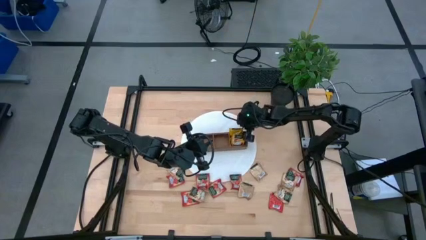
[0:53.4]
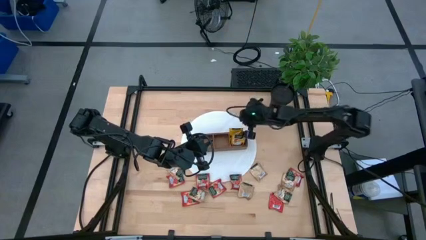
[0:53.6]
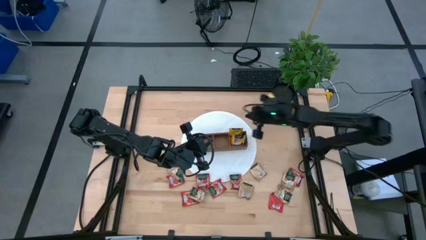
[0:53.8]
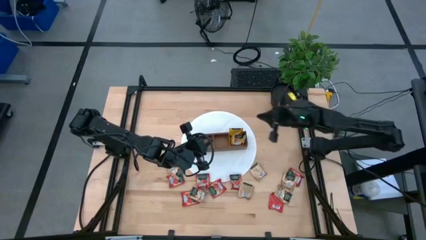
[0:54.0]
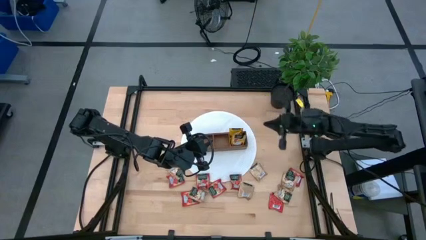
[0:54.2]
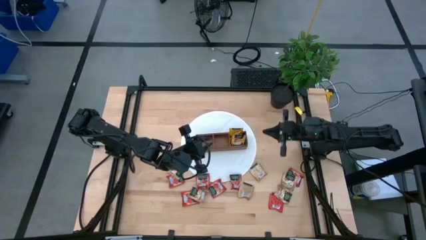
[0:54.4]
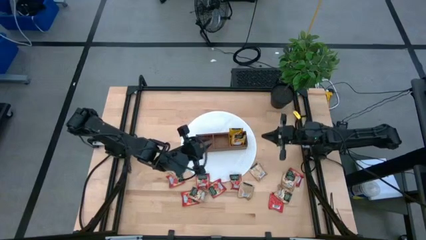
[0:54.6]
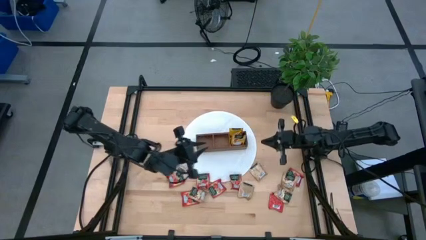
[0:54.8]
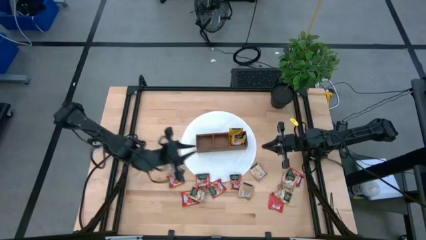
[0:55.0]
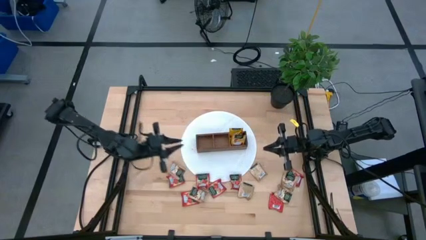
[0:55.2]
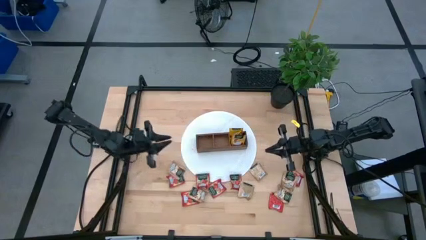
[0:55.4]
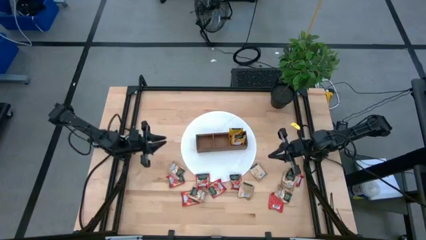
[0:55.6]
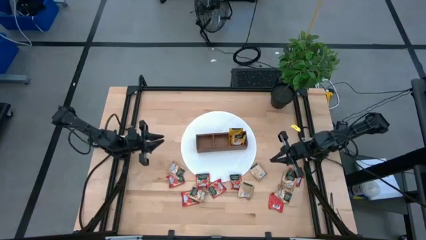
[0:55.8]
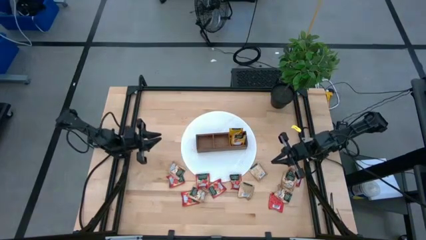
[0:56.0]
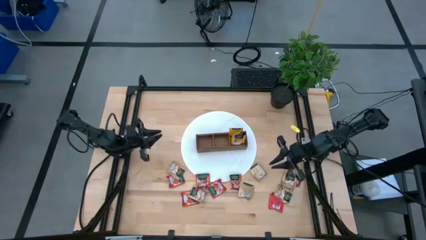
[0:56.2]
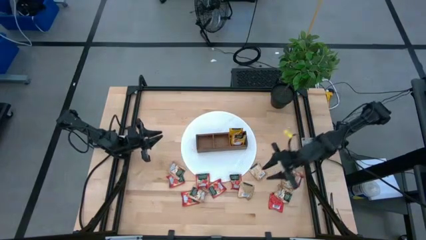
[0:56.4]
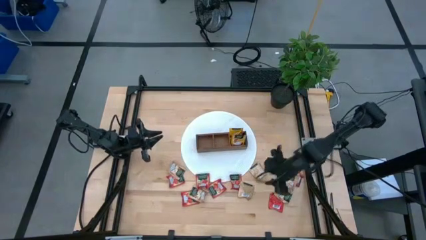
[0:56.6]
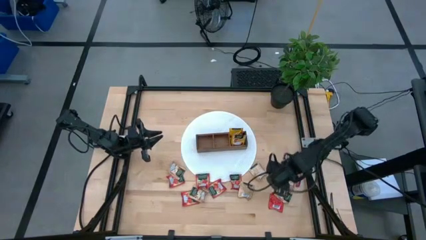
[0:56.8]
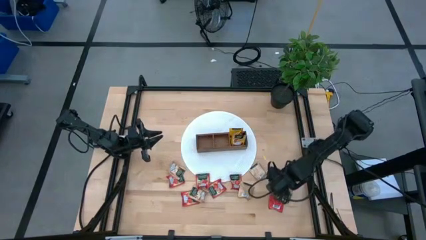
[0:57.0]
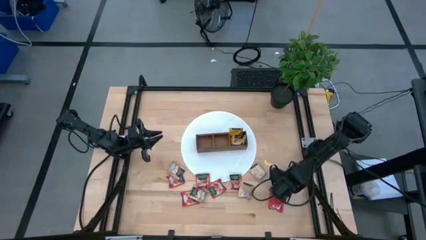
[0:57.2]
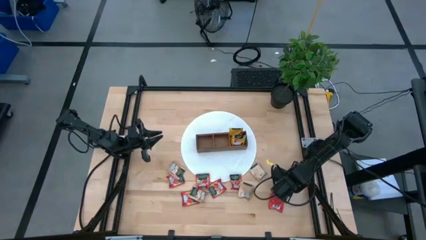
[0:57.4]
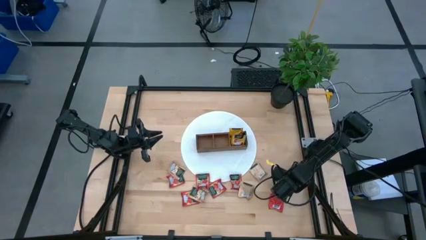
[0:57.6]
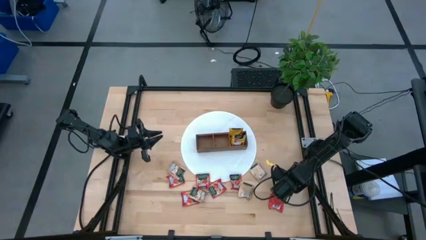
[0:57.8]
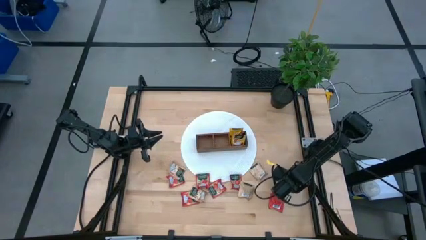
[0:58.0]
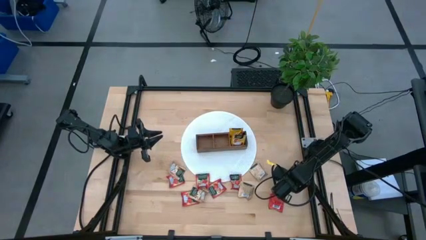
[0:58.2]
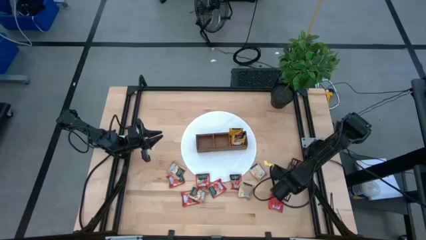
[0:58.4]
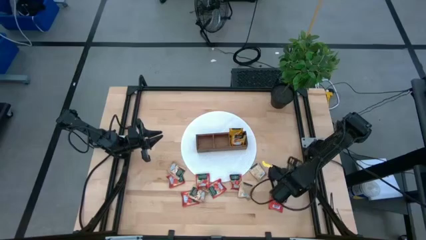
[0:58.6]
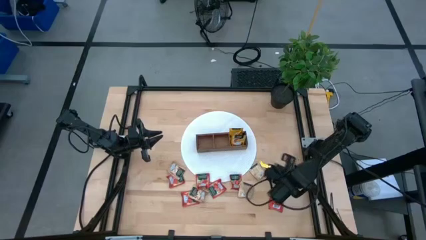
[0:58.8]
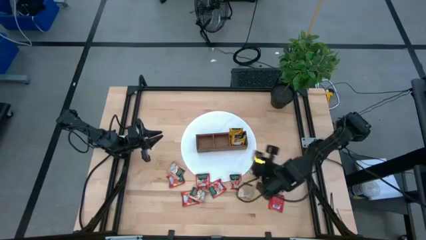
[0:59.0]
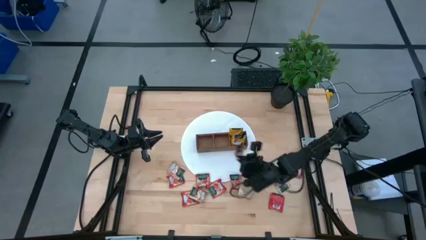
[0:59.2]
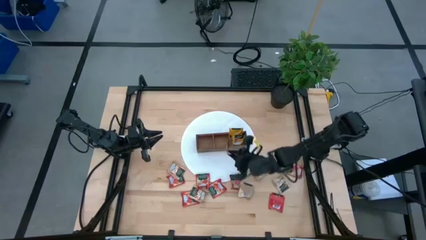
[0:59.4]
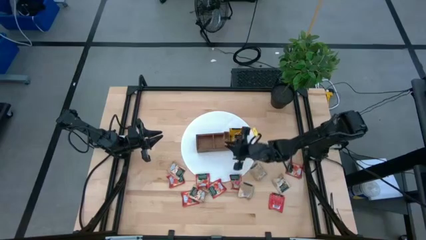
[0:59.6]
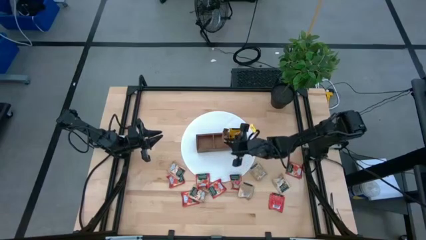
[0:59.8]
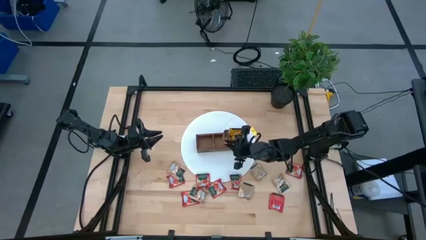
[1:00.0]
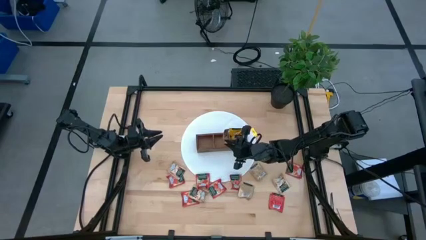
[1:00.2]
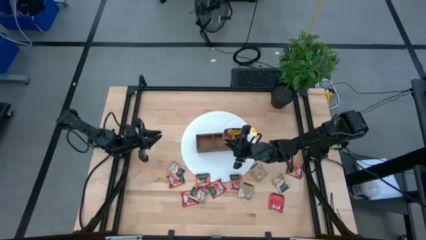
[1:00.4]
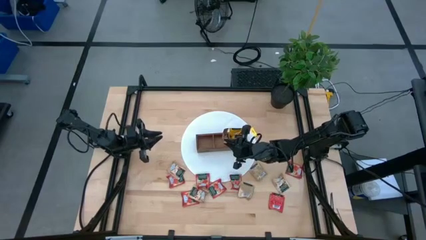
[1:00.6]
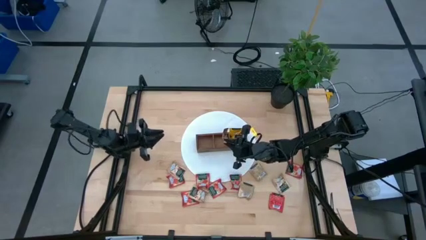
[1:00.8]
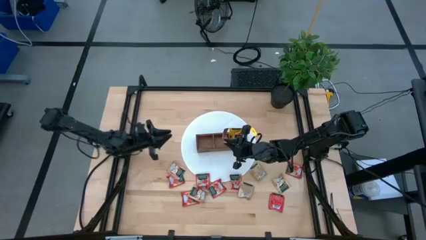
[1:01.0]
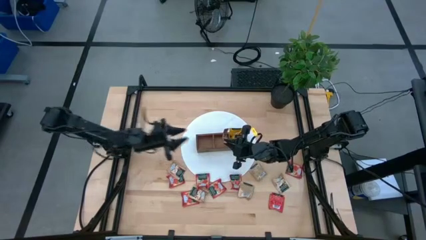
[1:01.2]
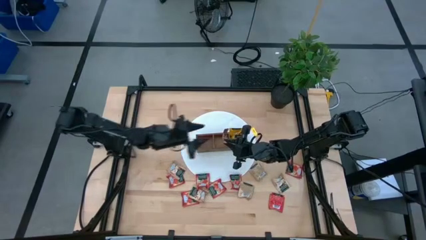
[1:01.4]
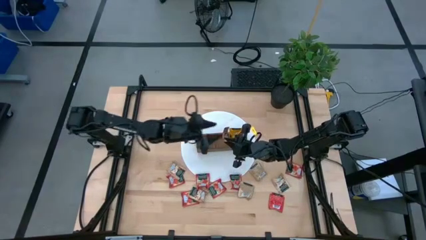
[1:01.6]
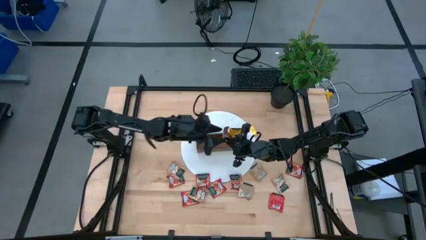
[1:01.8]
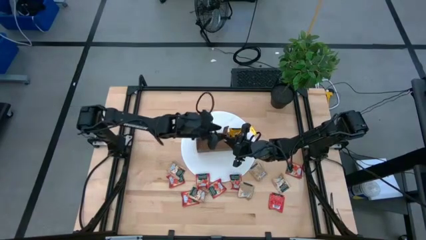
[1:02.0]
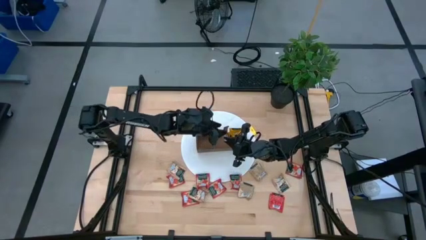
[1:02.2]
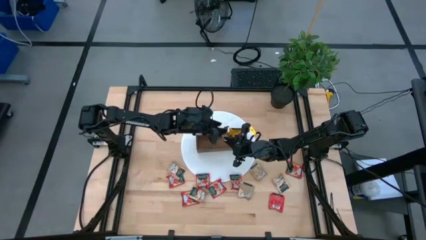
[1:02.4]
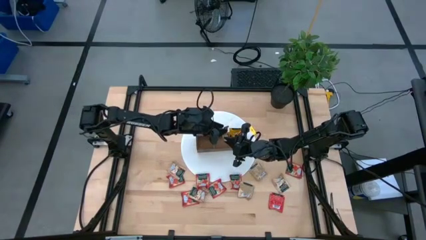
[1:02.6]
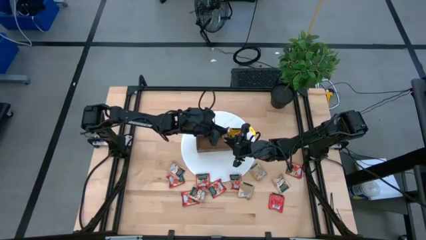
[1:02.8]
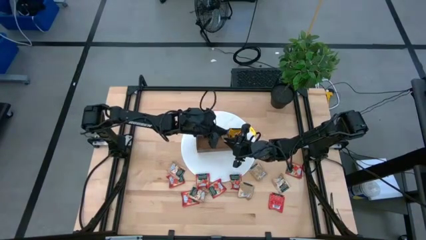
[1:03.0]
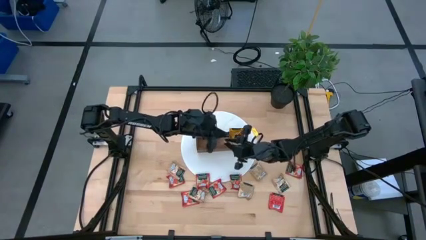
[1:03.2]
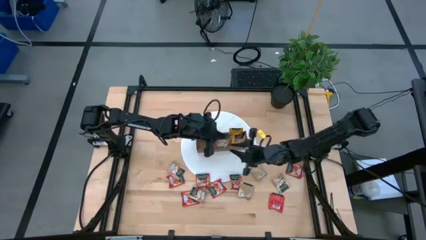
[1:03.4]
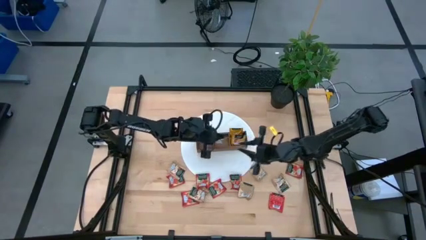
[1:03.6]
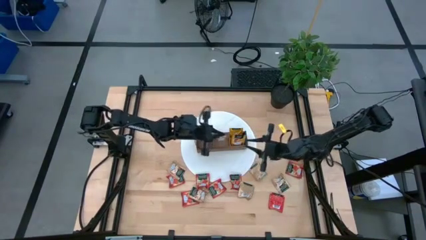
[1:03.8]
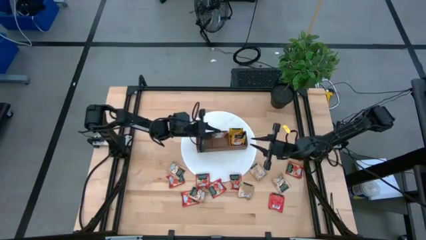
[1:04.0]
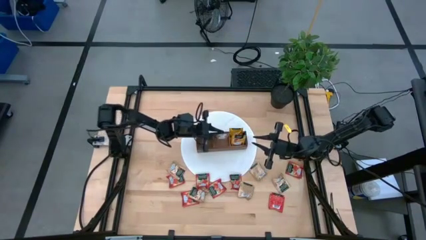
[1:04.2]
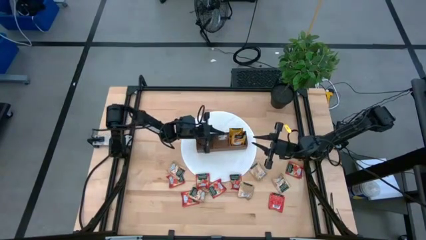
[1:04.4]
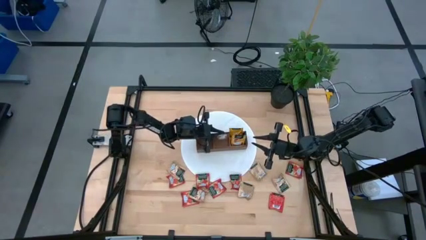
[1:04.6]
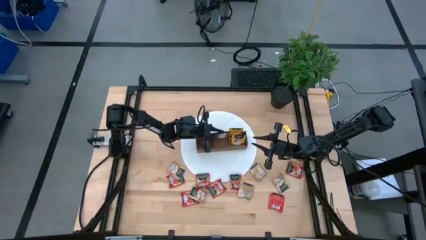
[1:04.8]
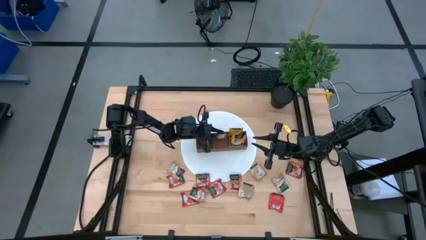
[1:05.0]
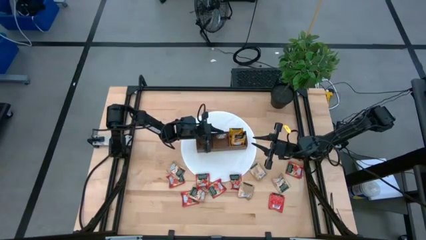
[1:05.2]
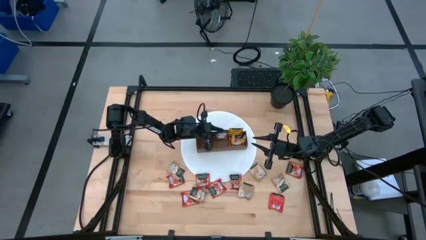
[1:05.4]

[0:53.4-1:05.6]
Task: Pick & Place Tea
Put the brown tea bag into the middle section of the wooden organizer

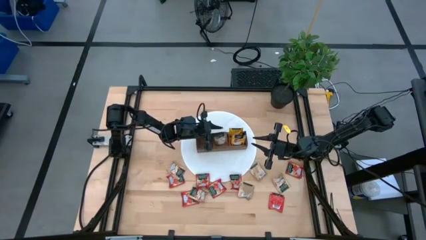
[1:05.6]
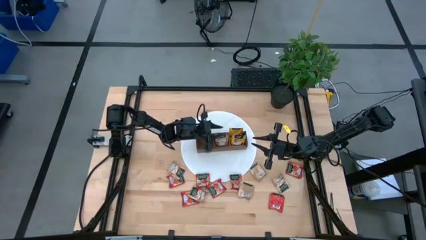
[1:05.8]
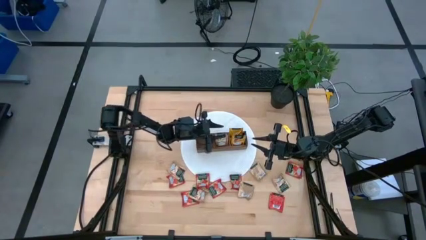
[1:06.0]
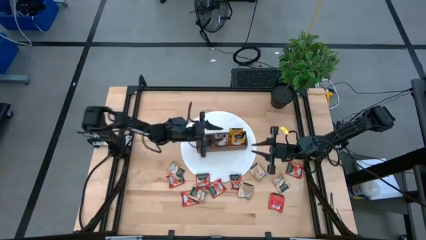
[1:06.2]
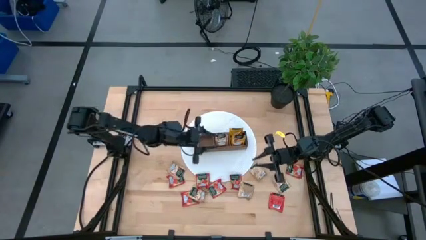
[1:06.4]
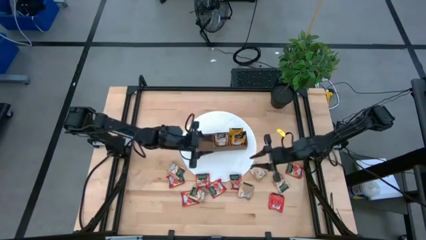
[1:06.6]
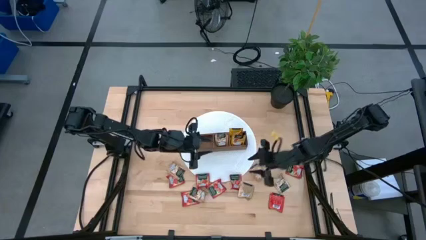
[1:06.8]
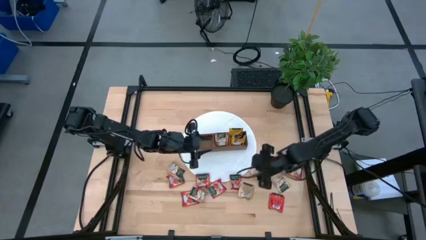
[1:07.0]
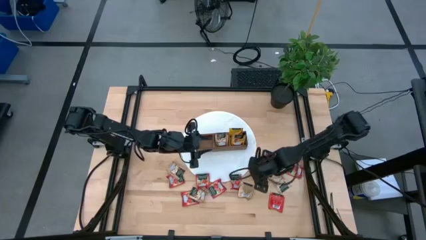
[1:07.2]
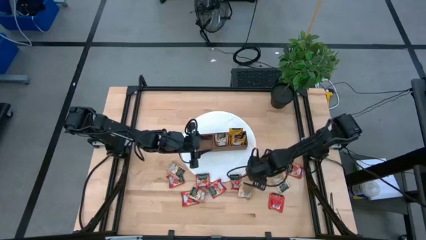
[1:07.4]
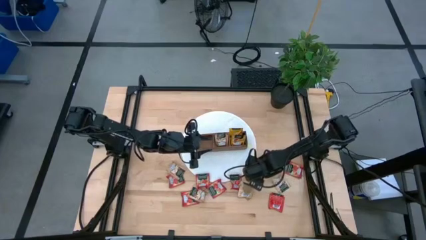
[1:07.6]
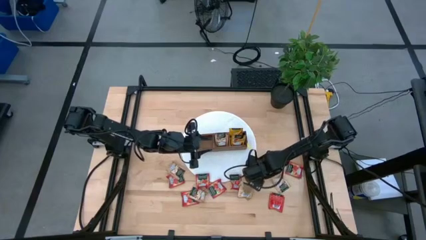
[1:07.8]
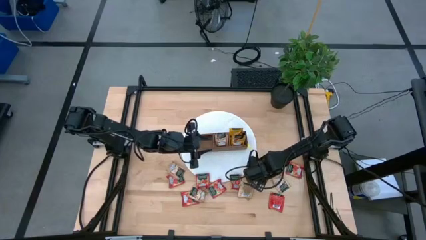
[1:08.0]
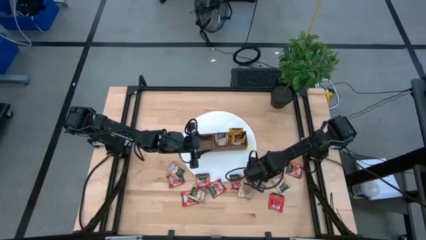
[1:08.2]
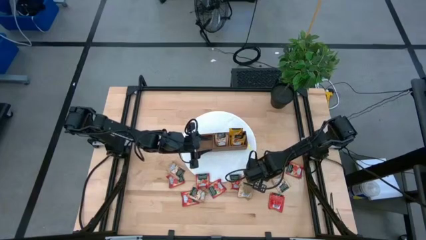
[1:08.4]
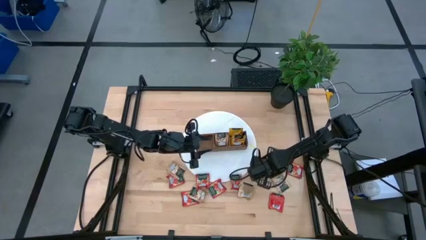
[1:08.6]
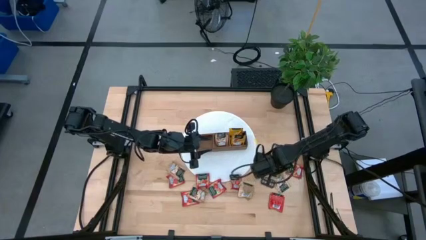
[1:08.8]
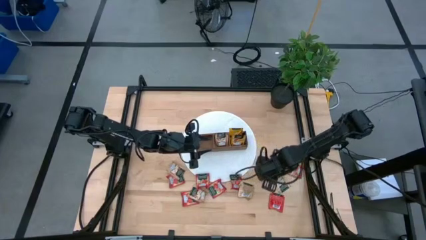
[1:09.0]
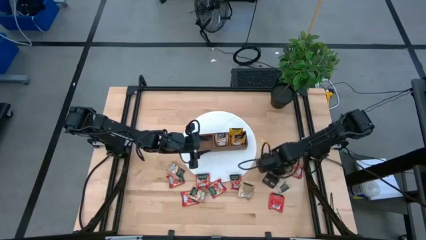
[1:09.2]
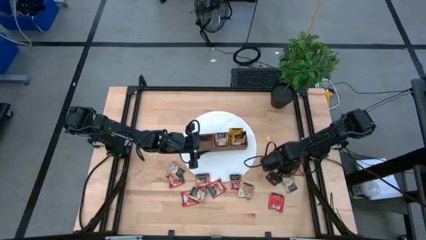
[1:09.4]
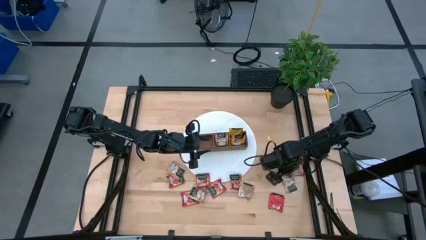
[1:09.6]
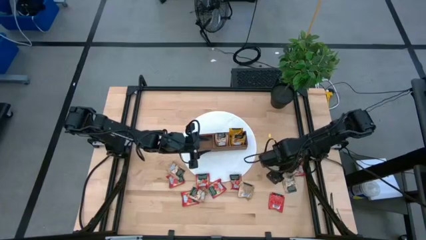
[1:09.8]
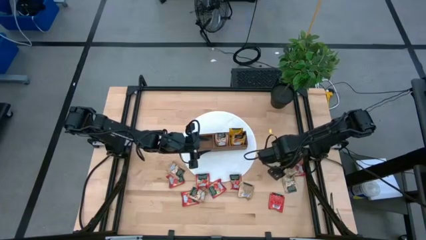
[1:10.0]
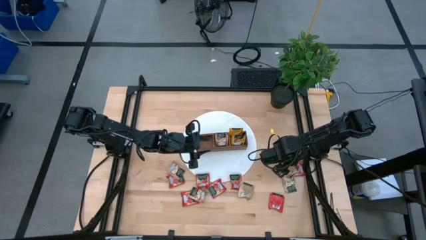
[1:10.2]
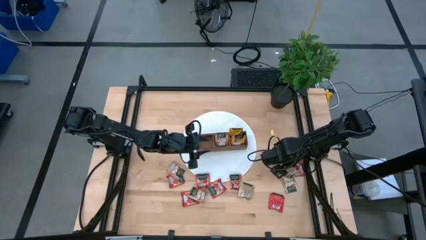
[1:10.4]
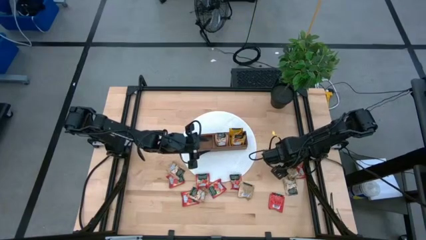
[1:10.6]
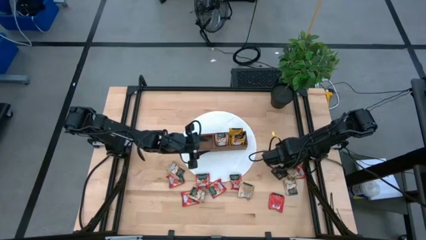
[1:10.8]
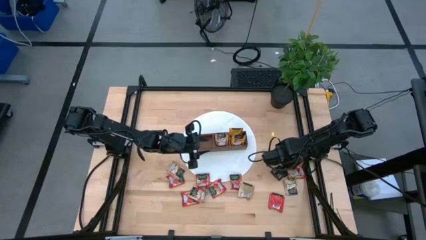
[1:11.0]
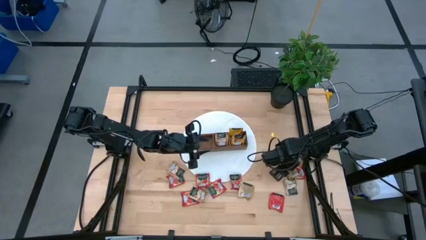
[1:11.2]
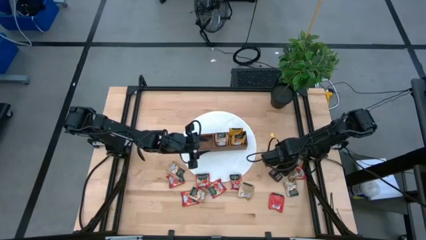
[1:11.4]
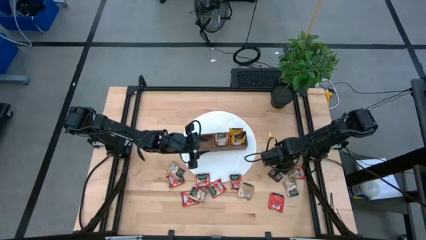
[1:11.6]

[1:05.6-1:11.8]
Put the brown tea bag into the middle section of the wooden organizer
